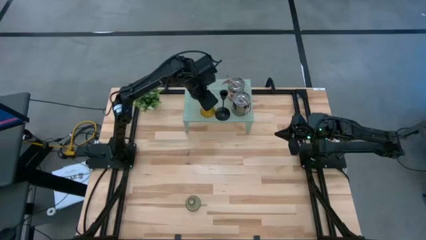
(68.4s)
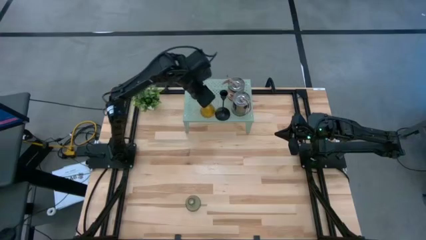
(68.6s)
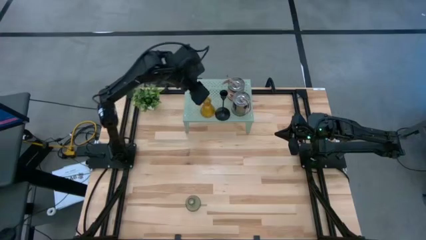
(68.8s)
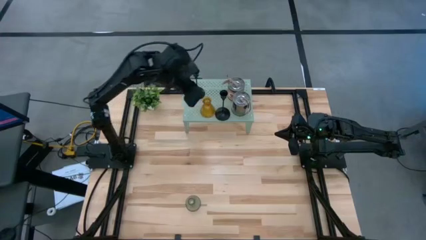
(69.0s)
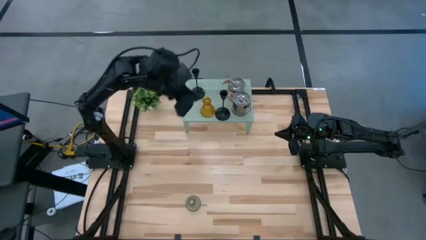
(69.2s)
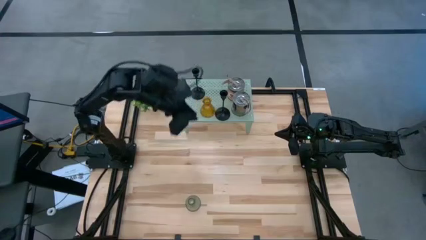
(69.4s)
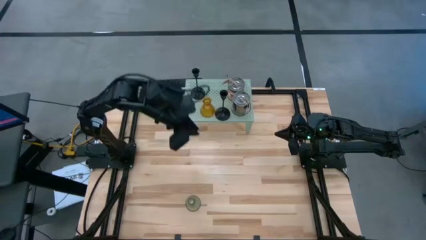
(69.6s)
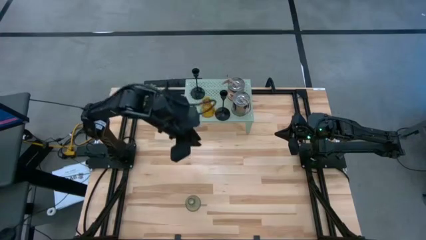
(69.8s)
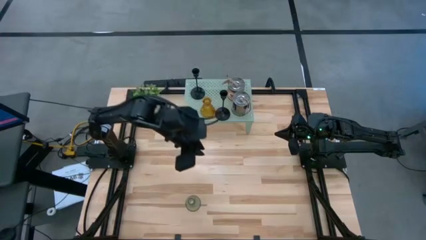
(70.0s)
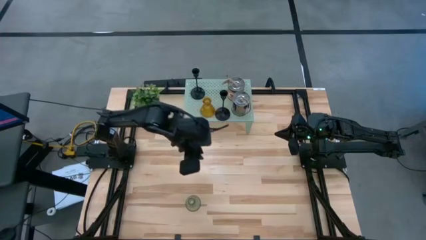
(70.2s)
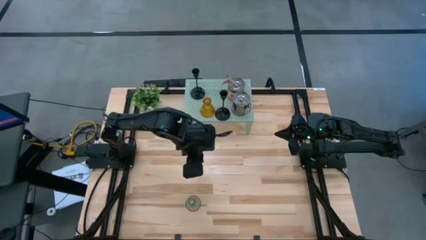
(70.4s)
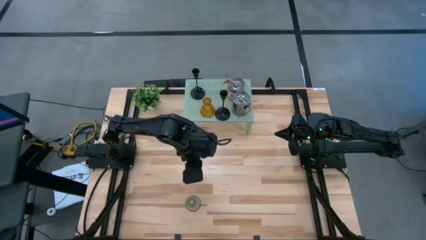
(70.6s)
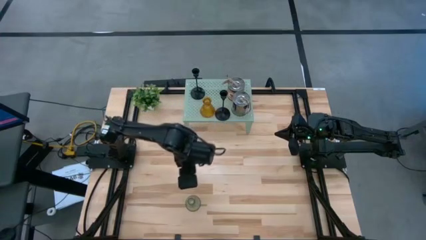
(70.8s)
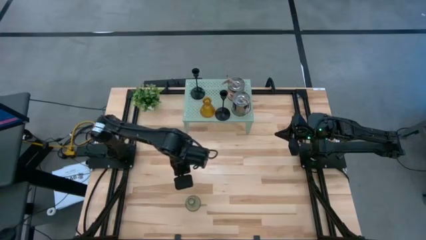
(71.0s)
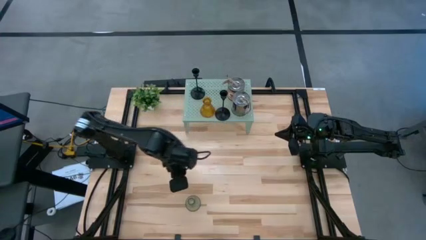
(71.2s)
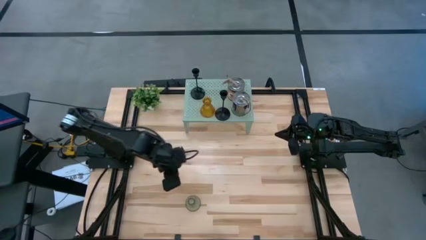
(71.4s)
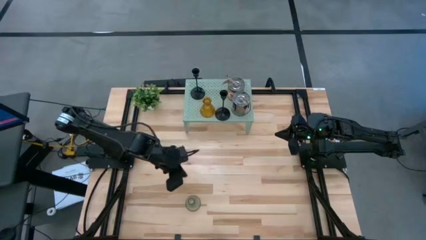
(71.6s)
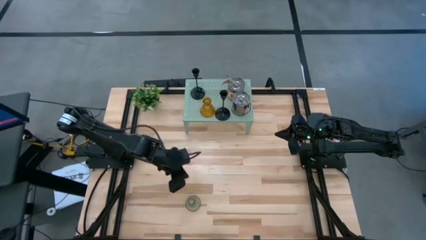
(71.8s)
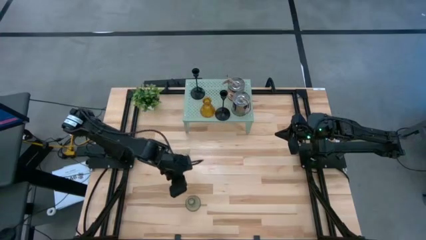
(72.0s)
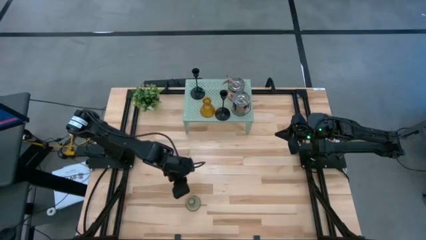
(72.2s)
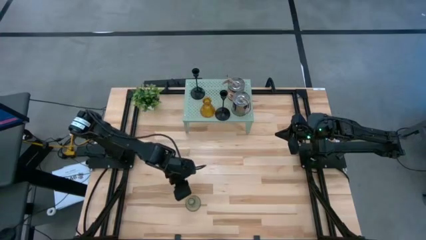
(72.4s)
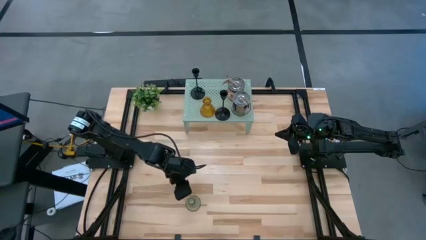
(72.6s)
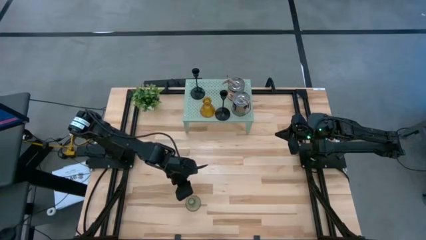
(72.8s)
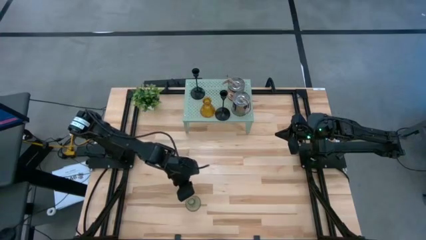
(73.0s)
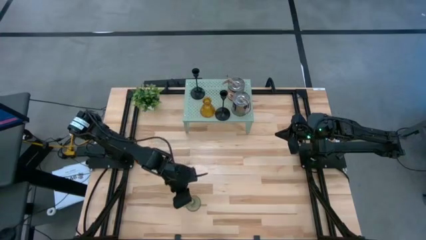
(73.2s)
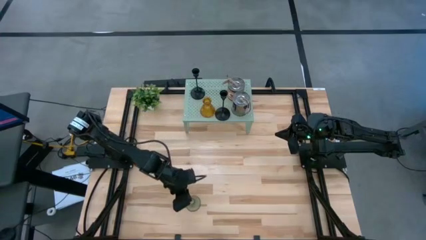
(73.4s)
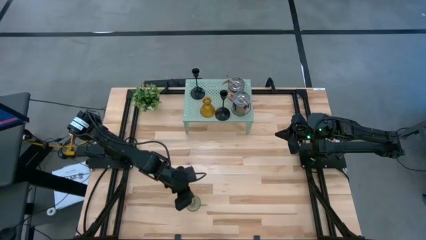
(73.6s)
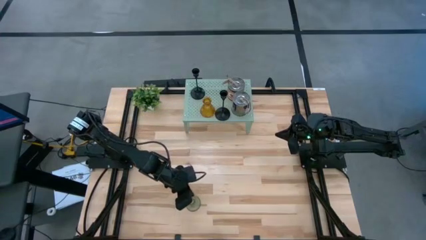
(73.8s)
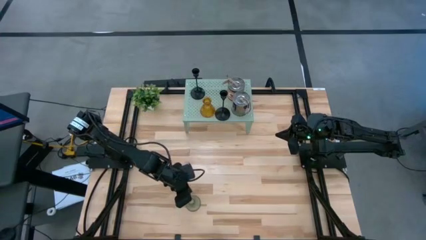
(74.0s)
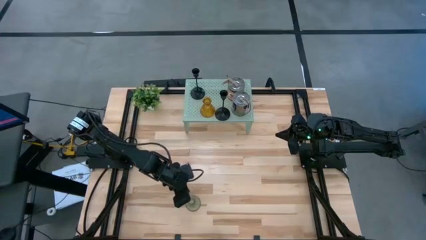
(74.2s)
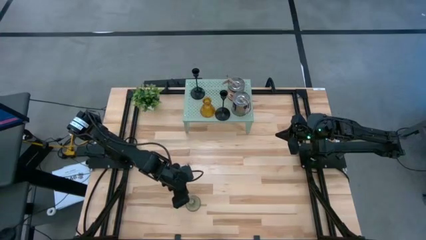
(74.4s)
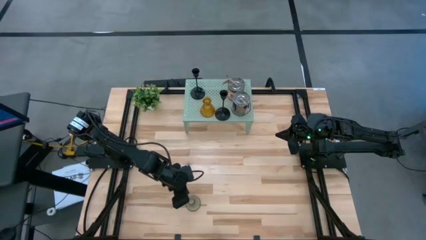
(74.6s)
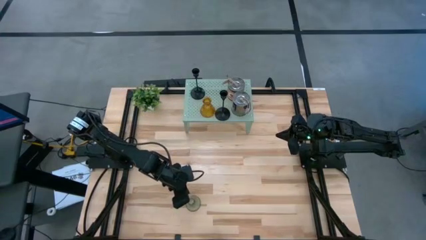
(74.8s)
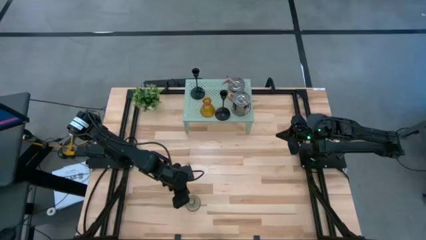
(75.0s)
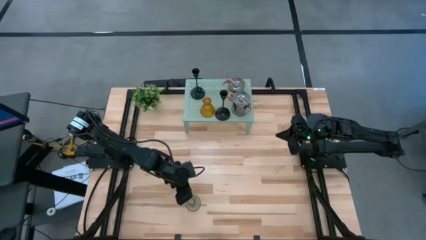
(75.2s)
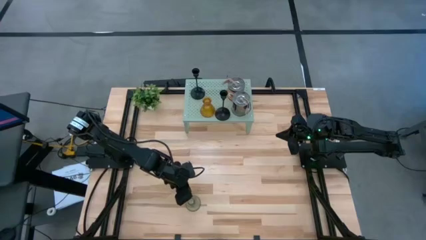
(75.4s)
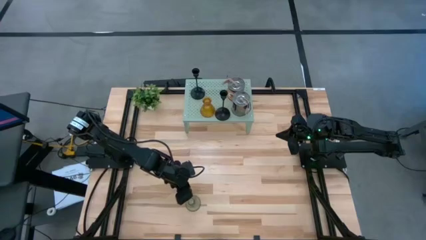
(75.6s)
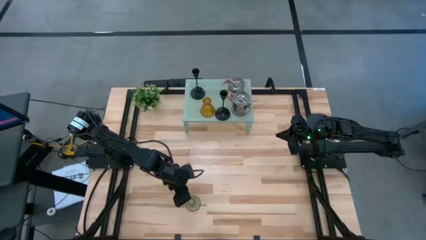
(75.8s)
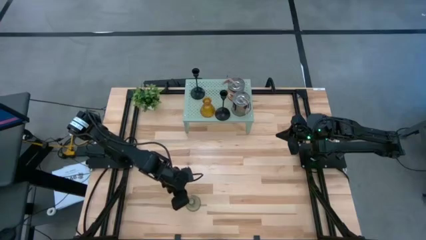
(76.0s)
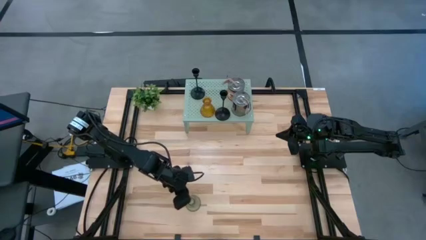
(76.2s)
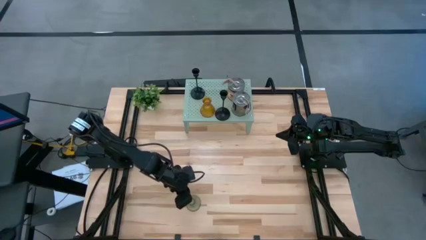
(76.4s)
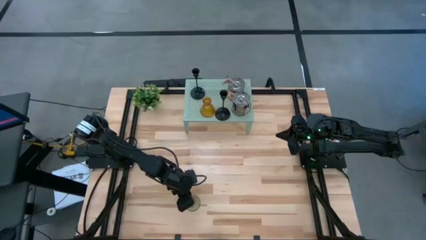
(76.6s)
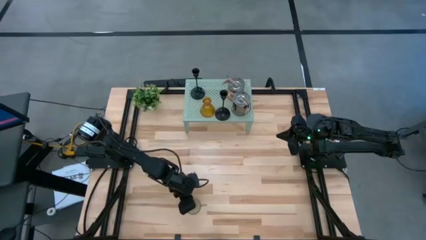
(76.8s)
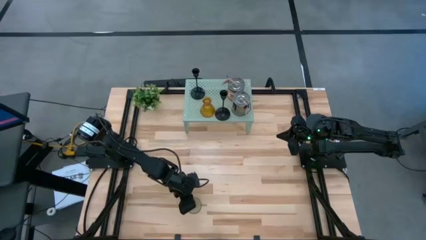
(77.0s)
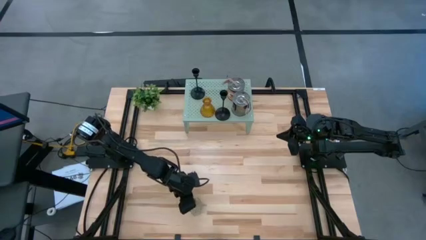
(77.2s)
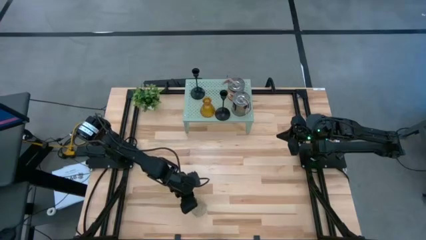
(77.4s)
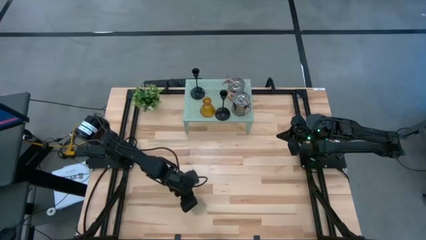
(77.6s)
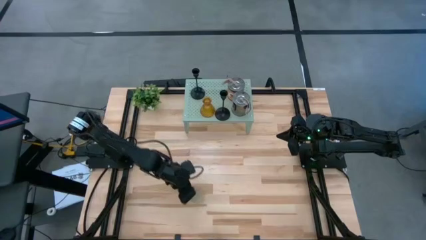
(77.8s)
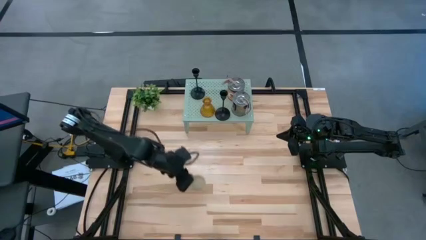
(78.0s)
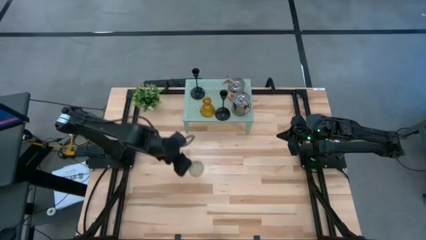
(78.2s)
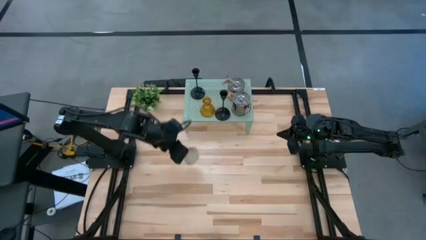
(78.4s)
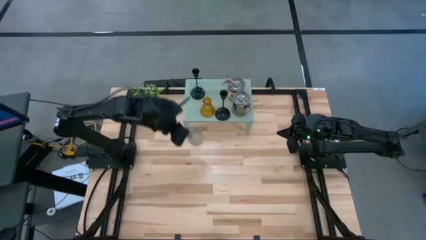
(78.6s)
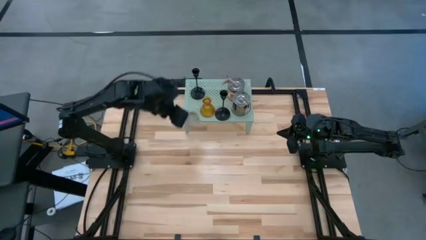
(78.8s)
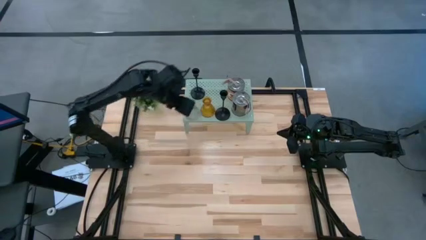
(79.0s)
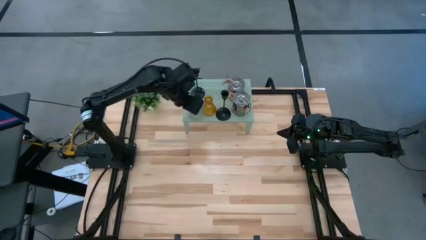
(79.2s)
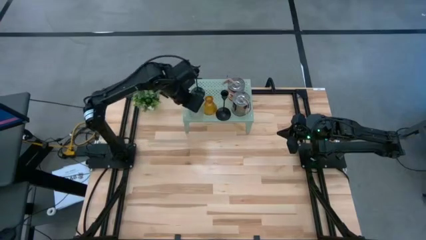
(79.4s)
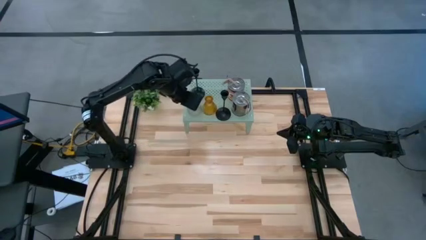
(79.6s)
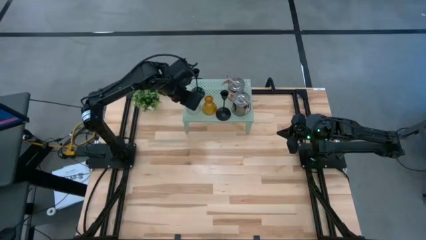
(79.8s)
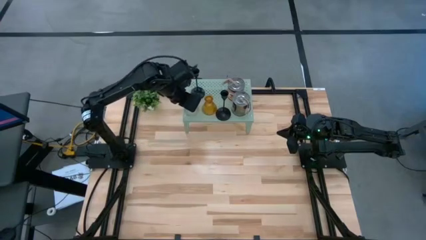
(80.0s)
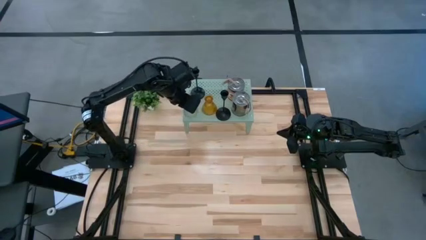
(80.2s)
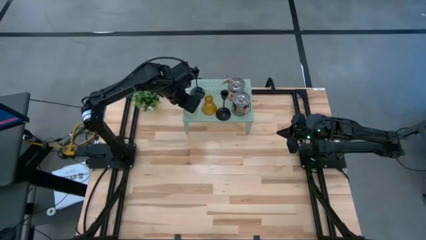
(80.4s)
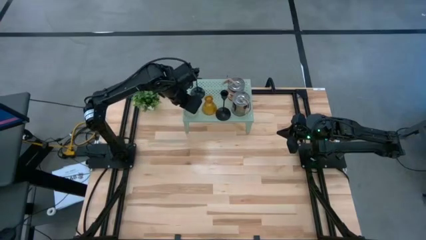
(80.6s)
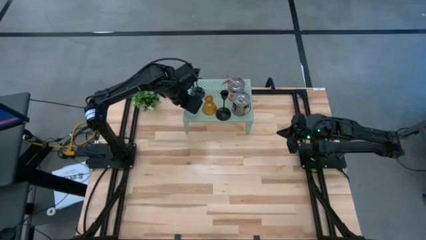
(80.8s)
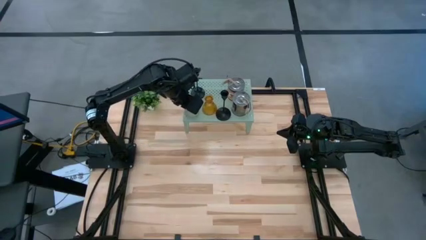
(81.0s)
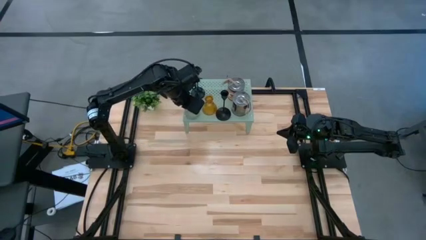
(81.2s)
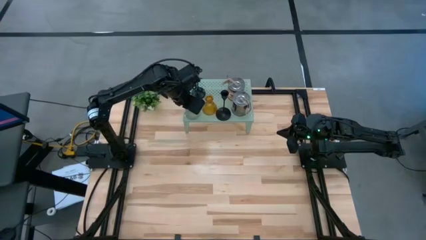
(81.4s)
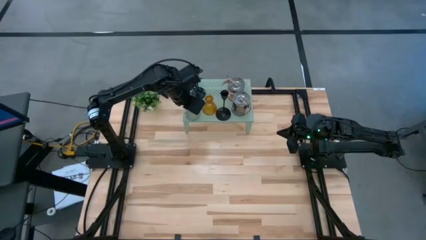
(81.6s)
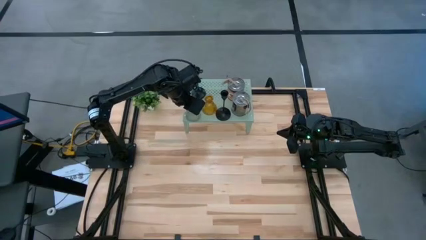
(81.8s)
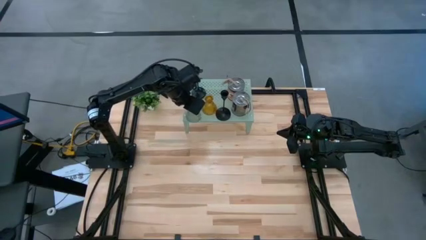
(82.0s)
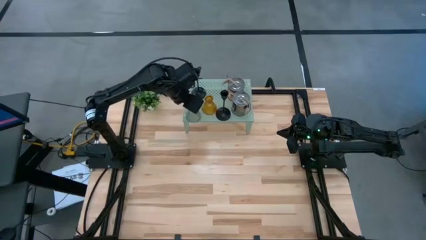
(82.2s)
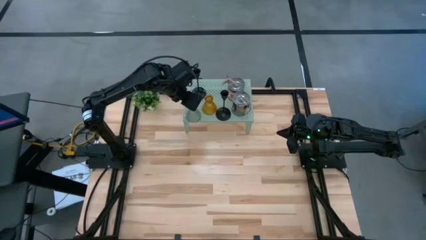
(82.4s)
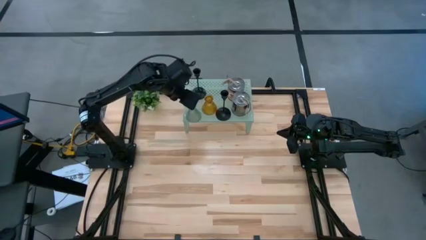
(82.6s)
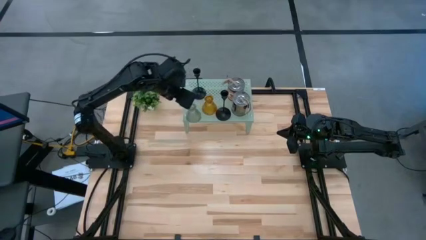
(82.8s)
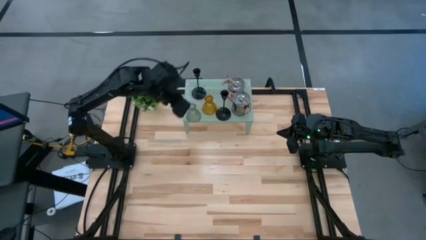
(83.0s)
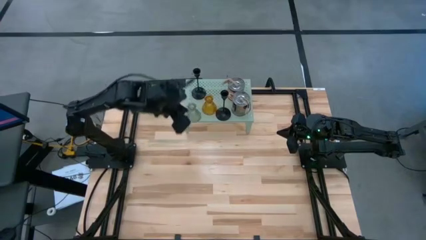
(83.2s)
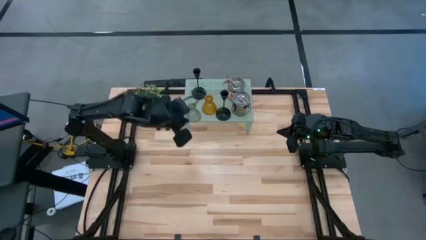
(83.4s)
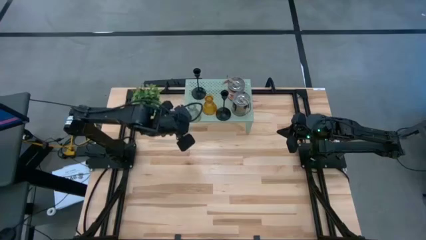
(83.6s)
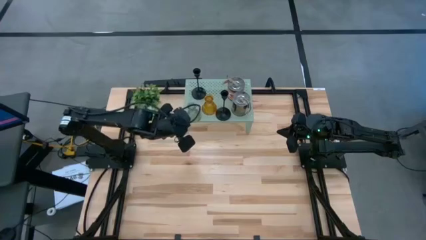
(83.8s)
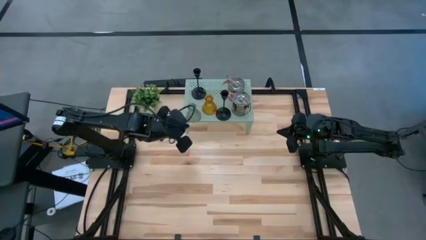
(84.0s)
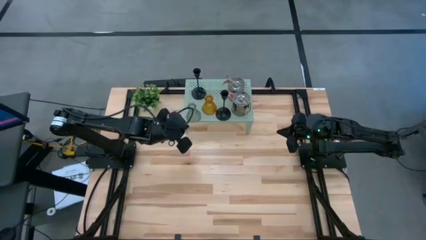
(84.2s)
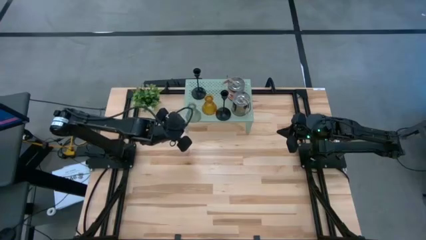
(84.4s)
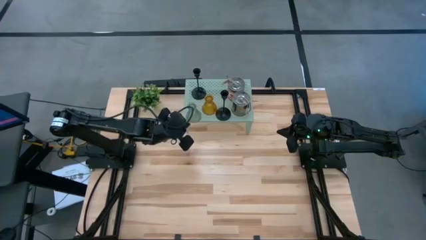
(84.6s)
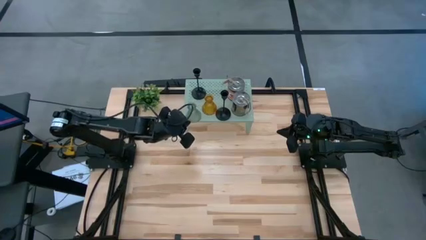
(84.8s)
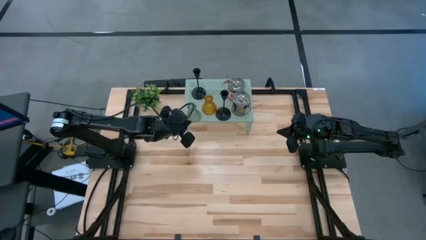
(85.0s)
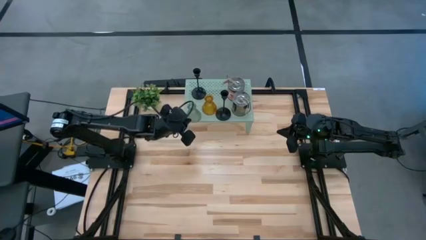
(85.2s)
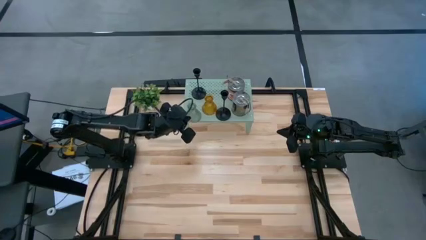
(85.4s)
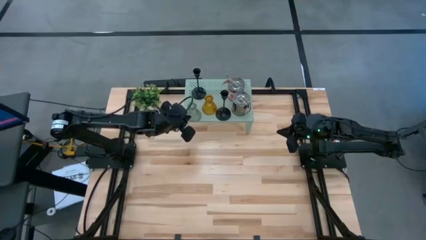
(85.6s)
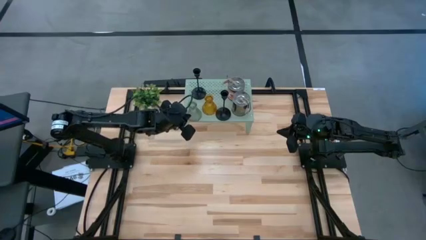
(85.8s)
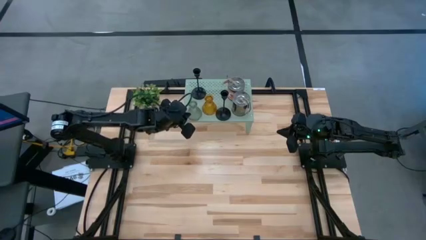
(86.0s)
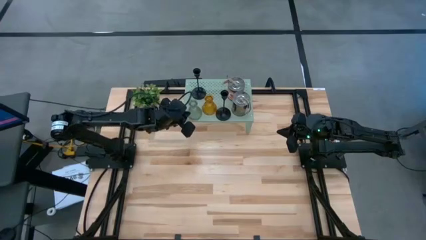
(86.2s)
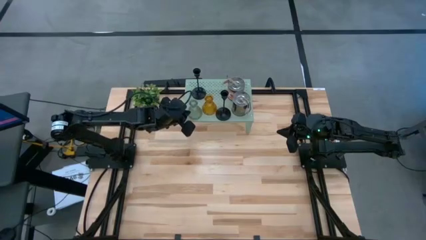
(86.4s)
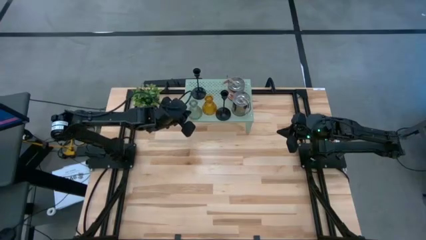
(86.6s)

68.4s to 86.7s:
Task: Pick & Place candle stick holders
Put the green glass candle holder on the shelf
